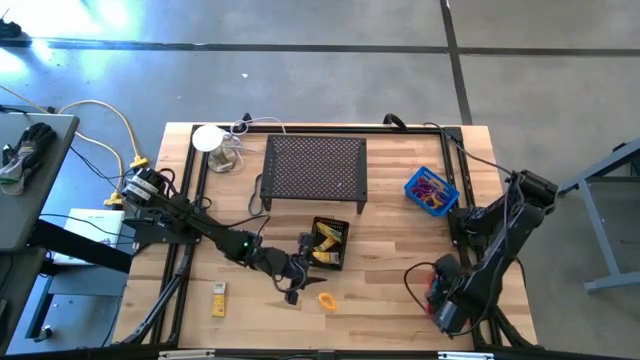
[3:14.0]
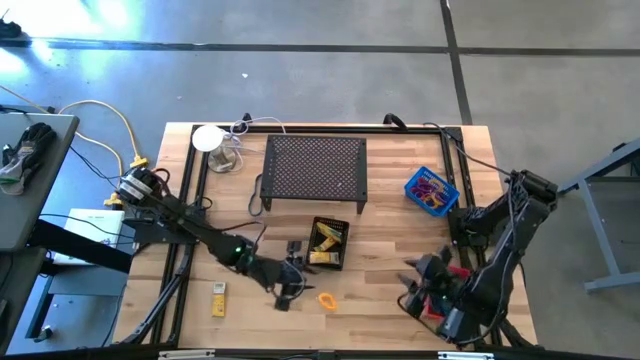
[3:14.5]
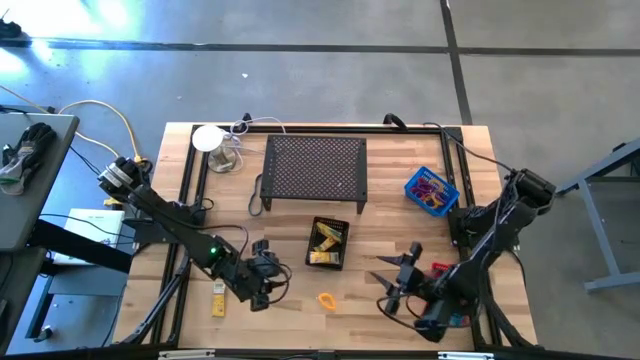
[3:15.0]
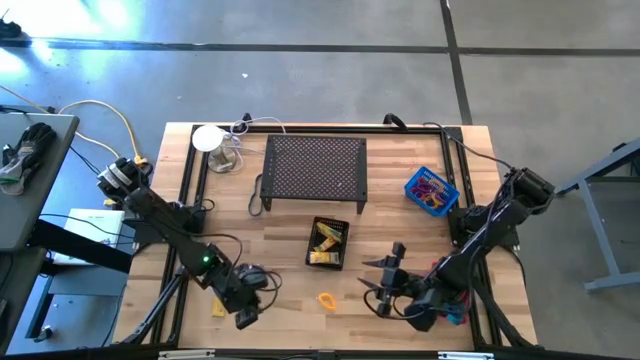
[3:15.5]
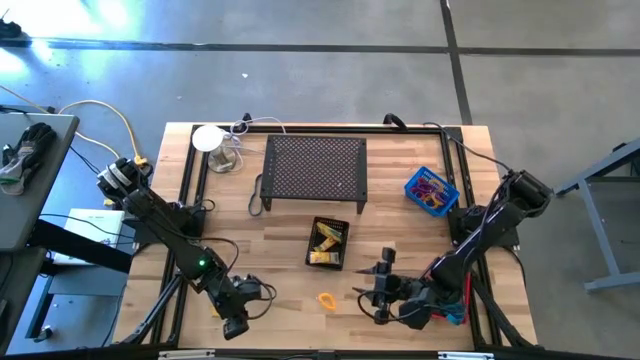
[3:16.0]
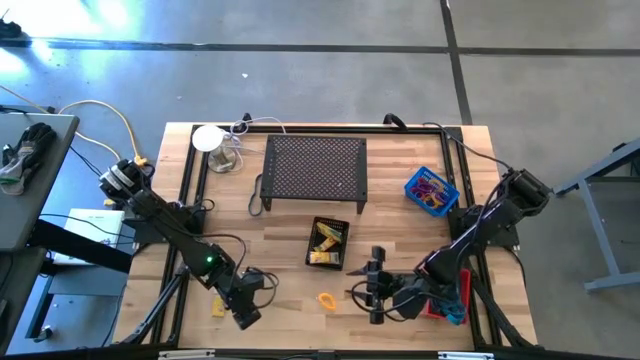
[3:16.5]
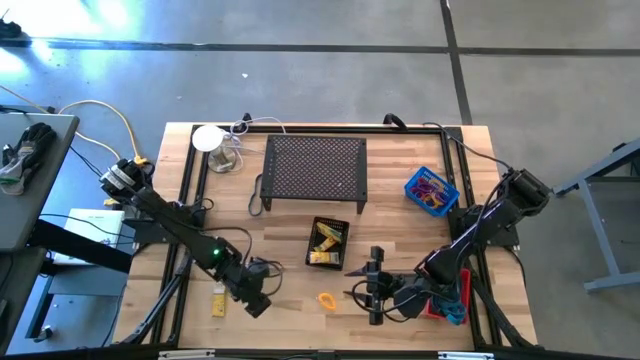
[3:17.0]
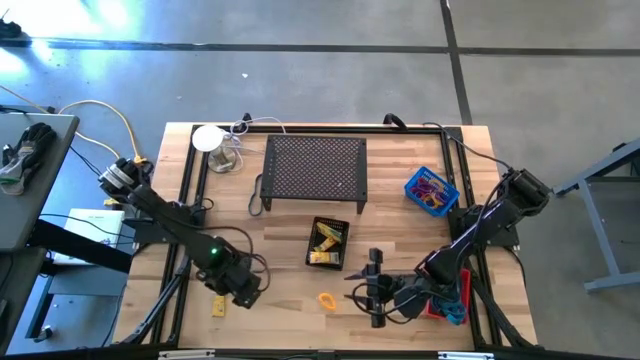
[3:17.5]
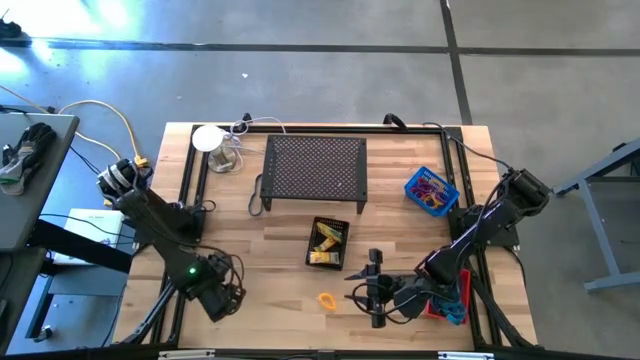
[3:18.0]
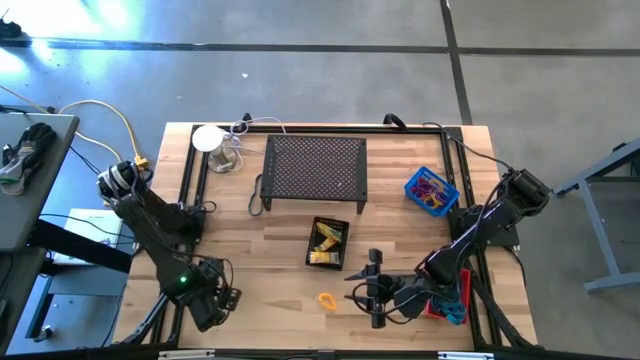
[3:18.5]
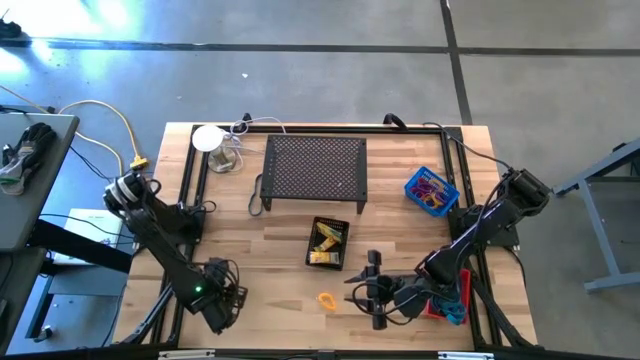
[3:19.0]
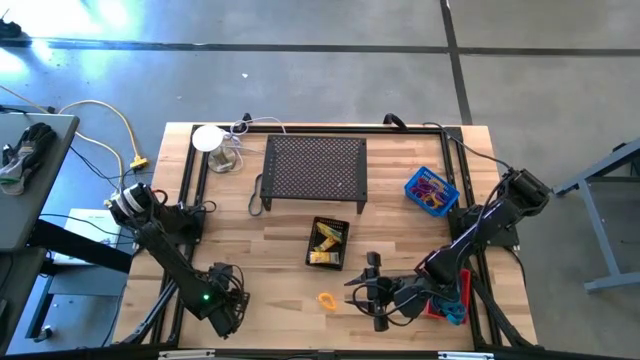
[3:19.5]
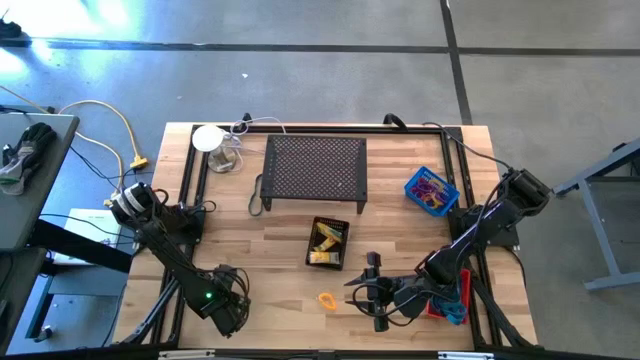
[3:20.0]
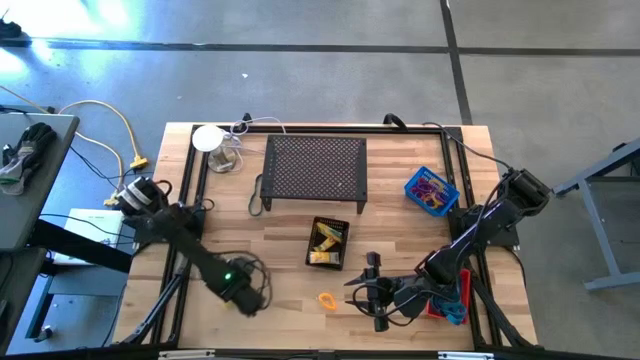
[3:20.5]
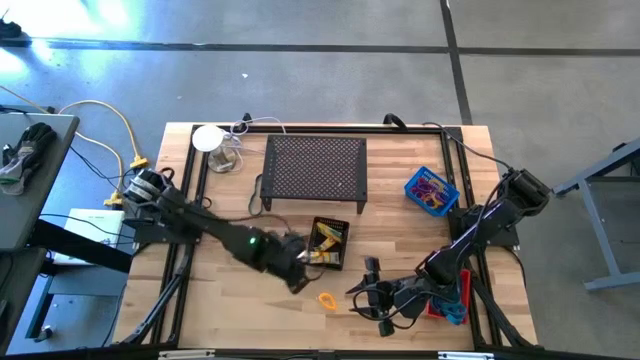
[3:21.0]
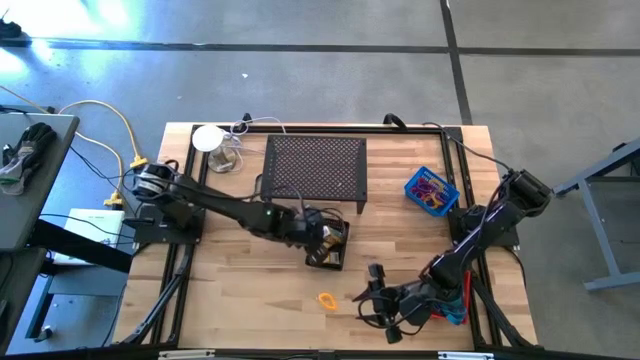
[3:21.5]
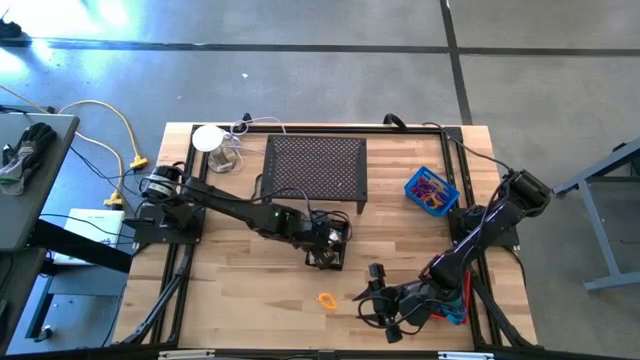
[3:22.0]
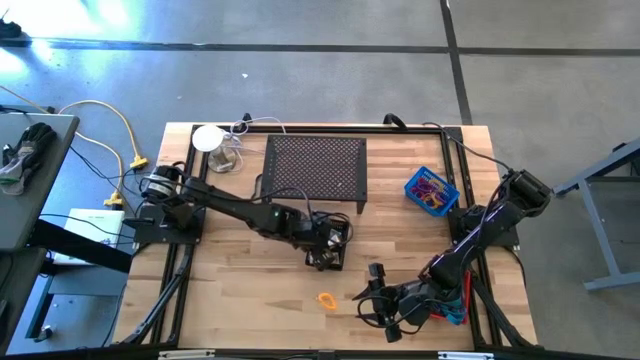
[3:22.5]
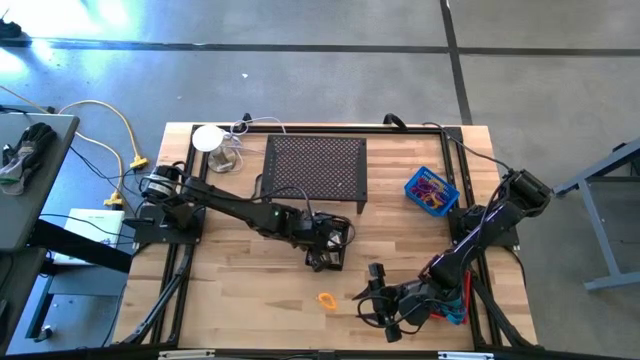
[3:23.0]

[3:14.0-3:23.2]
Task: Pick & Place Office Desk Supplies
Put the yellow crayon box into the black bin

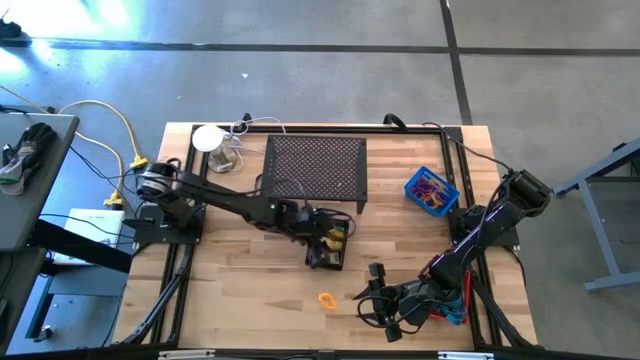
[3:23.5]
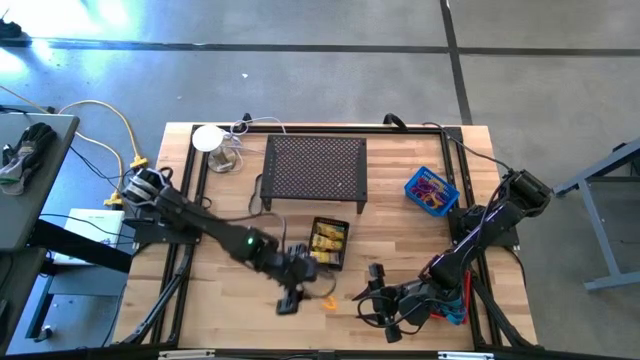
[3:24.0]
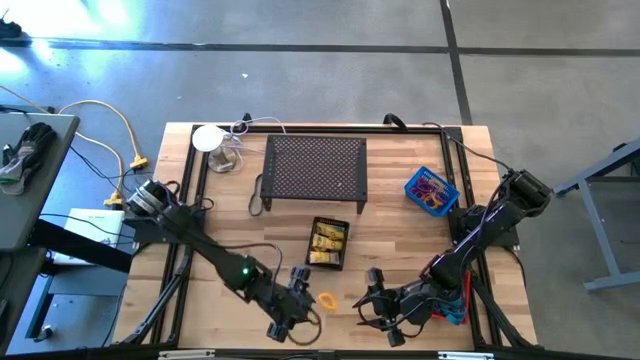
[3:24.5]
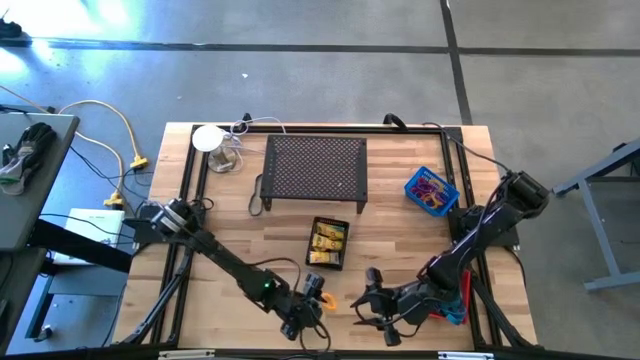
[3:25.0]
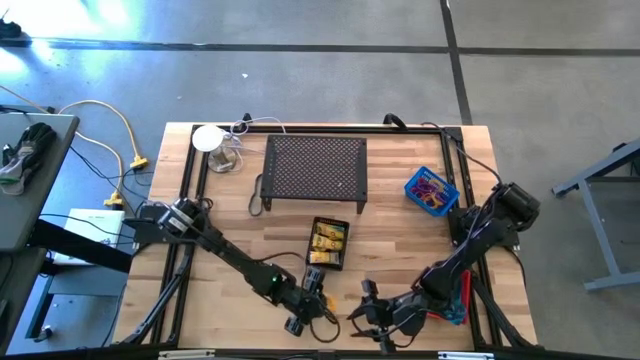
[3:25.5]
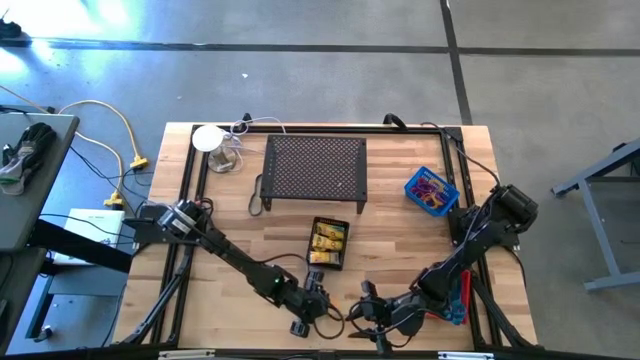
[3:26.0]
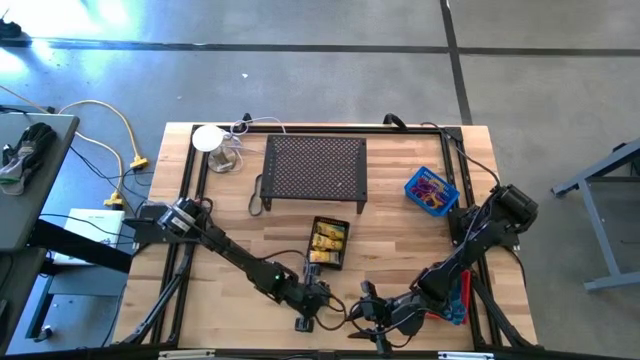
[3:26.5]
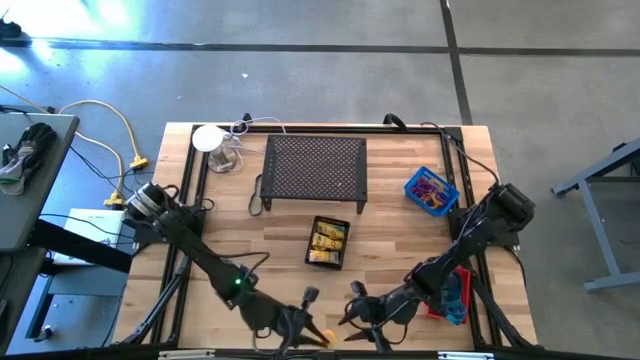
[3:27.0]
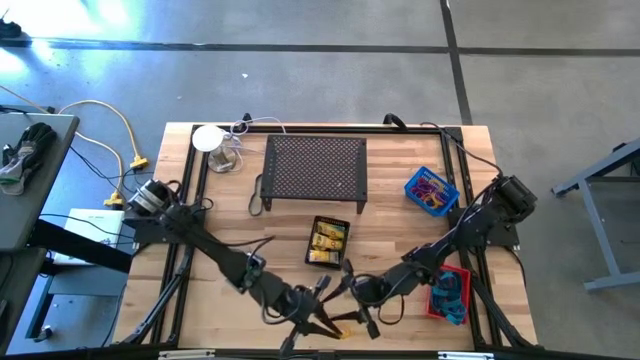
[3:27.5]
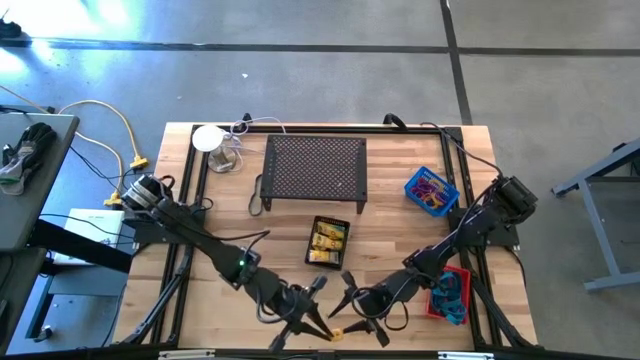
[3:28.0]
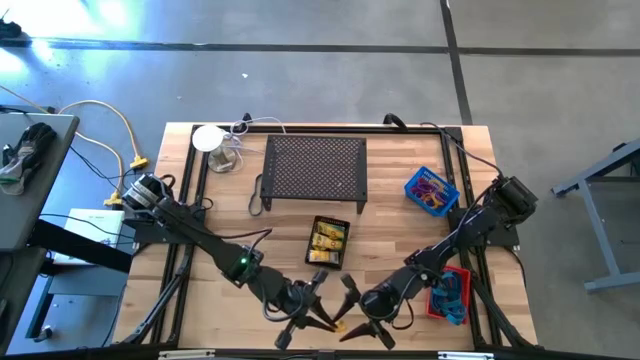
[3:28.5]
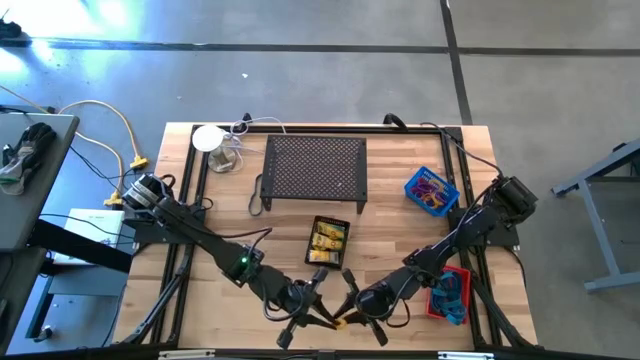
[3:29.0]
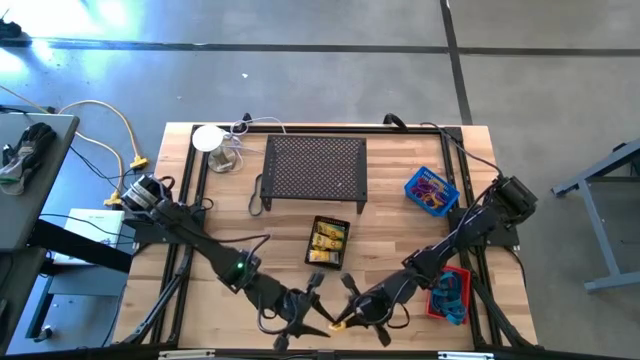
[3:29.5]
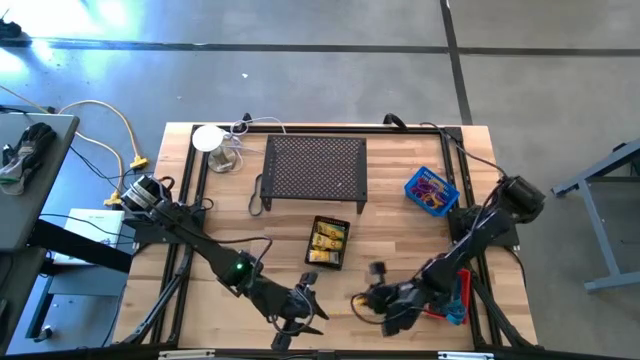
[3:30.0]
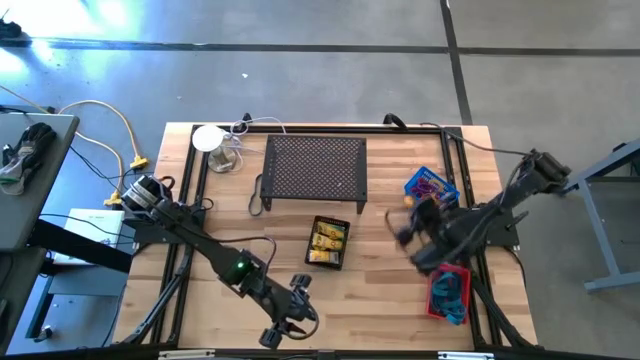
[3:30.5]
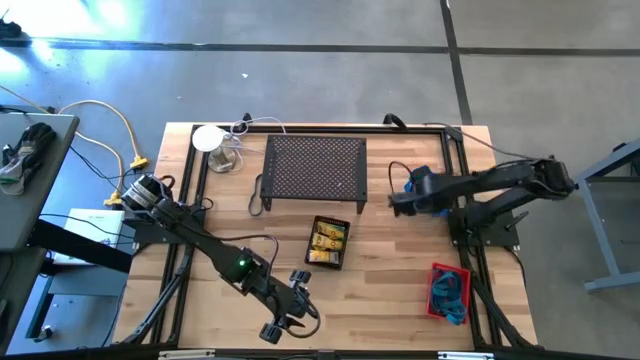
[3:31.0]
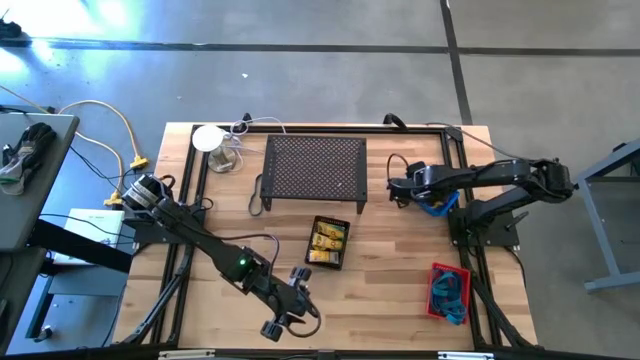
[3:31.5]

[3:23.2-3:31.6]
Put the yellow spring keychain into the blue bin
